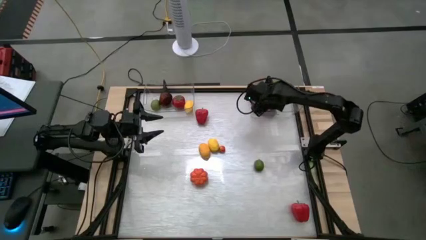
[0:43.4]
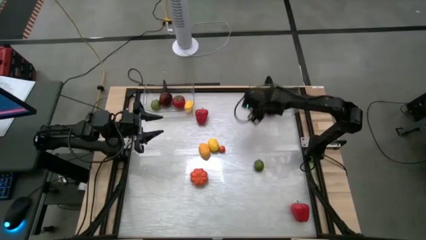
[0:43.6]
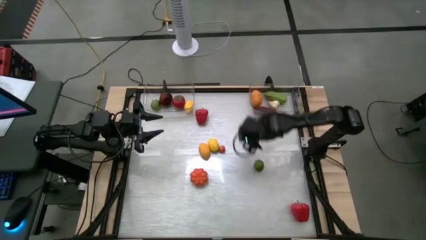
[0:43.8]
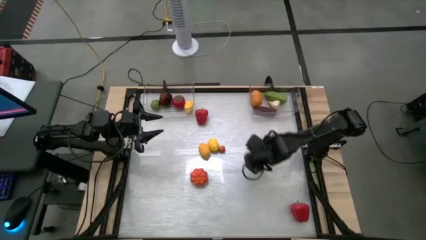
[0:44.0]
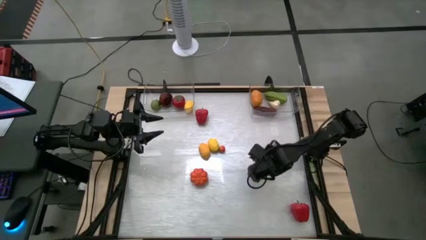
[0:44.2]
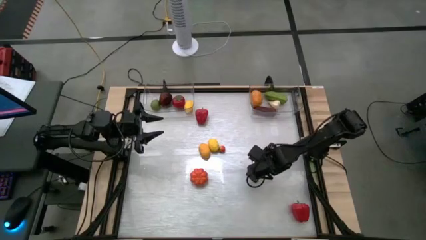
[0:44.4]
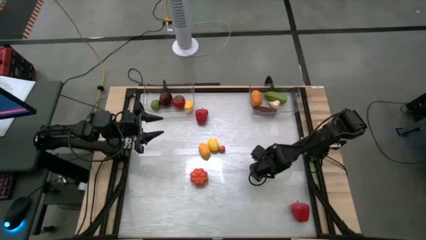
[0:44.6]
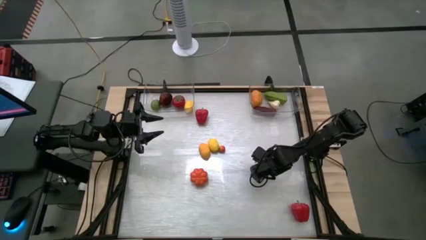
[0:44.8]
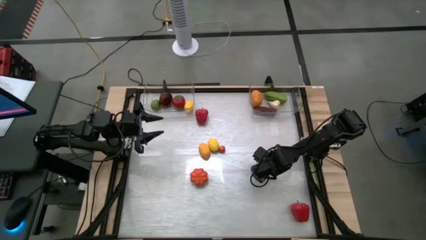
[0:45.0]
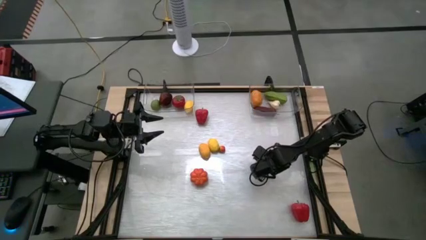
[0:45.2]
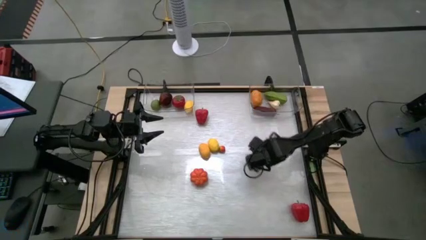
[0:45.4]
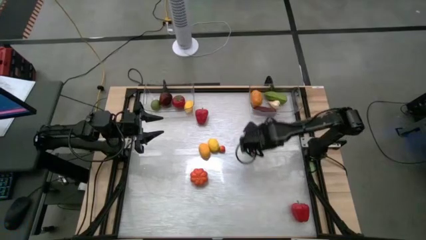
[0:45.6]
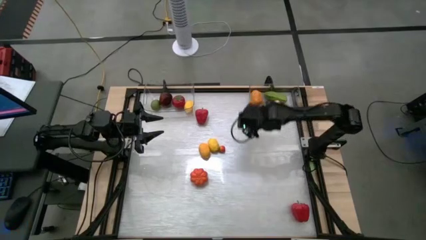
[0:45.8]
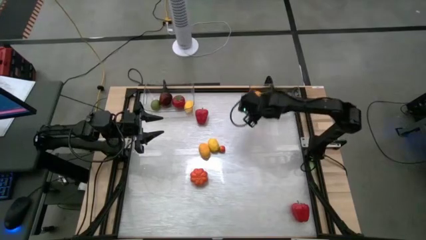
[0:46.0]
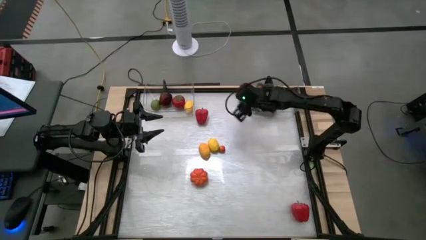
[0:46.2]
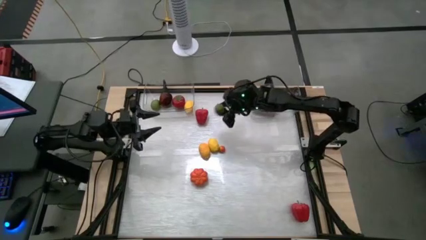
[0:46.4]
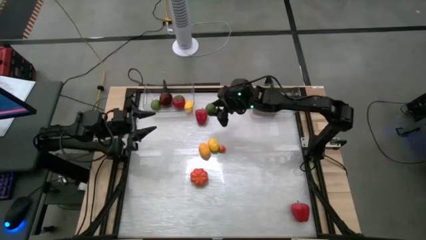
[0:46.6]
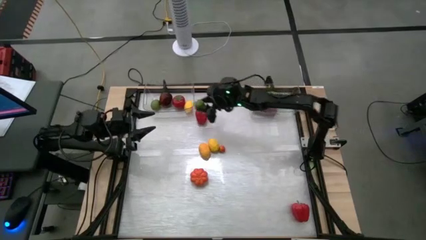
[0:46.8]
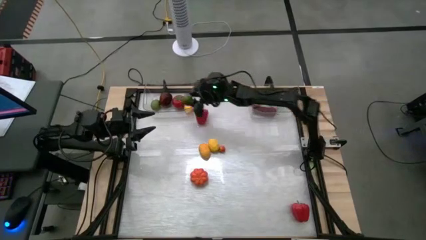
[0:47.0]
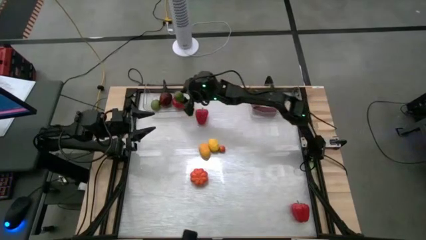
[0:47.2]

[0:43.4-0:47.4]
Task: Sort produce into baskets
Put the green lime into the left transparent bin

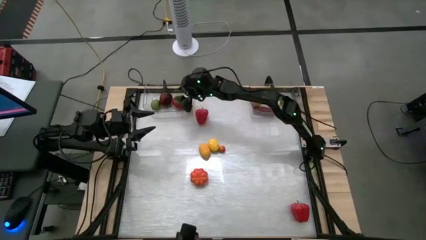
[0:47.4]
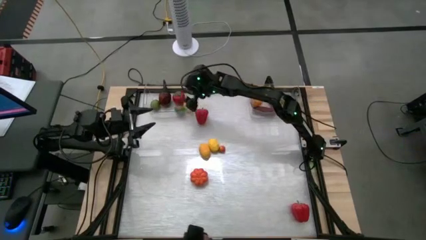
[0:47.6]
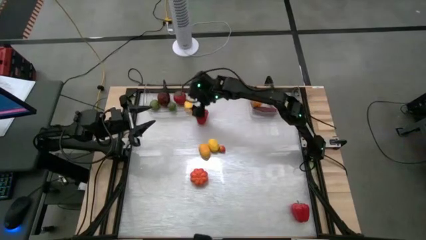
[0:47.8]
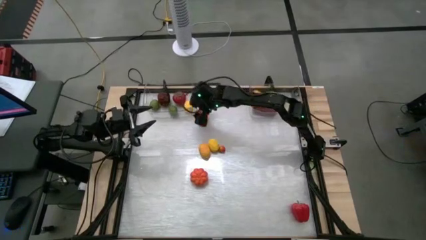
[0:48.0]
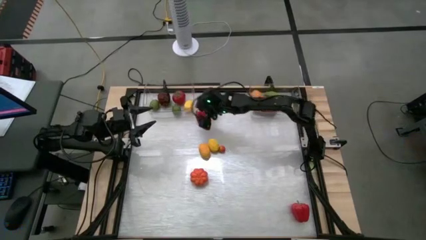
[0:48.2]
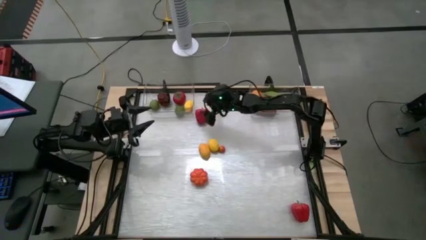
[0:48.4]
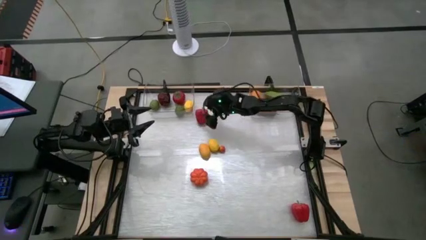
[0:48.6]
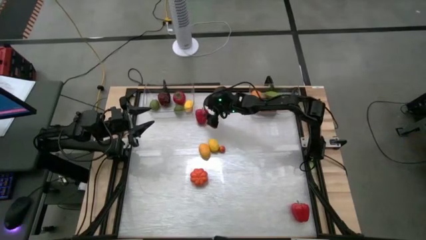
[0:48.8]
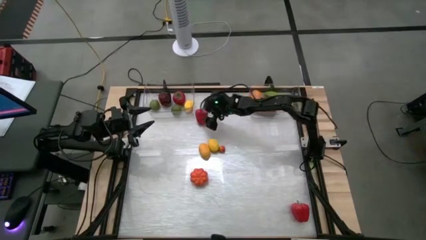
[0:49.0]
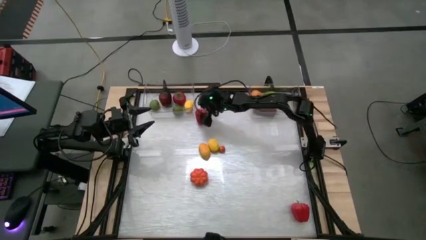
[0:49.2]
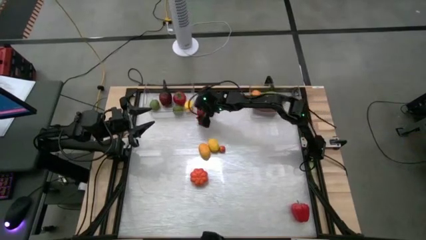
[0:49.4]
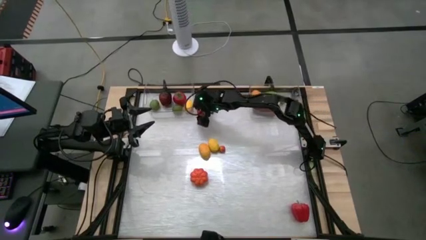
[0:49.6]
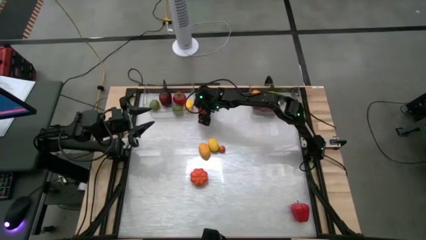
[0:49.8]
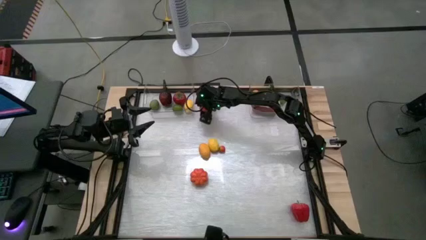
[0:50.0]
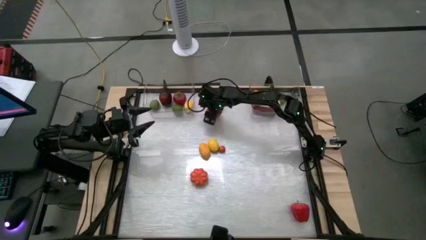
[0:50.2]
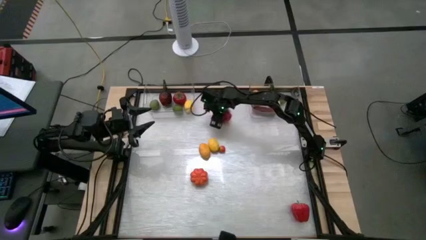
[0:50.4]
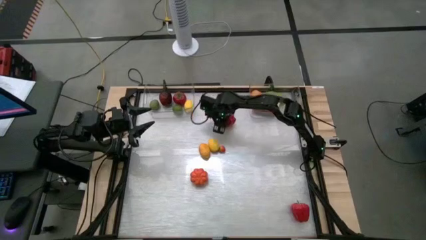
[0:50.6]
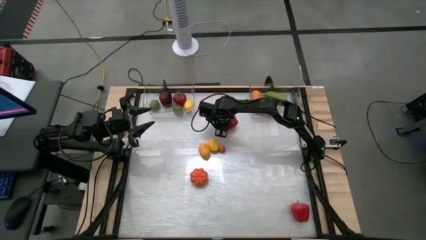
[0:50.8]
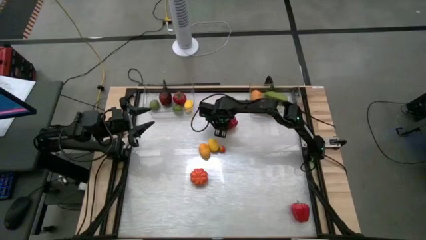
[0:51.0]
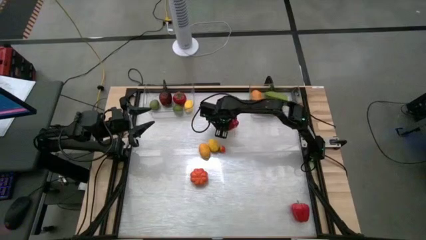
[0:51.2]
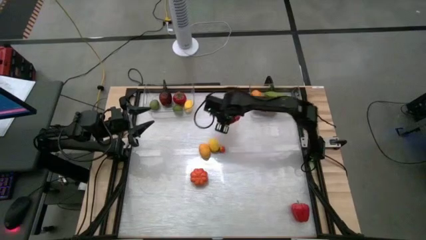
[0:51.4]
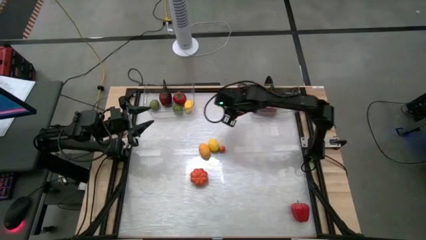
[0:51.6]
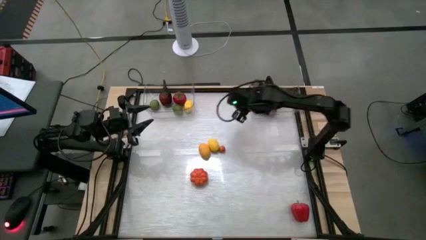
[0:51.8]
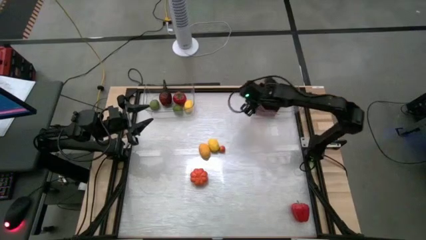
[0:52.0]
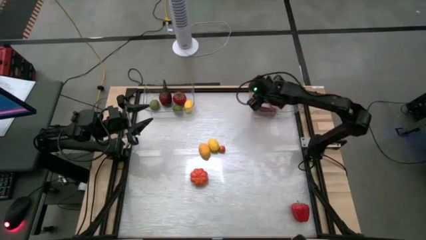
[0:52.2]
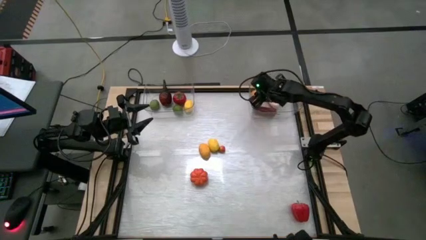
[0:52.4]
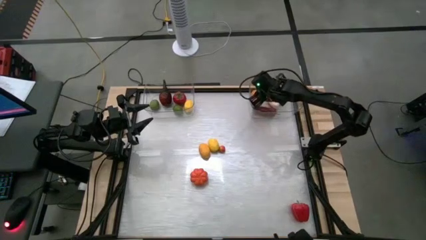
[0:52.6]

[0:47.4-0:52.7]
Put the top red bell pepper into the right transparent bin

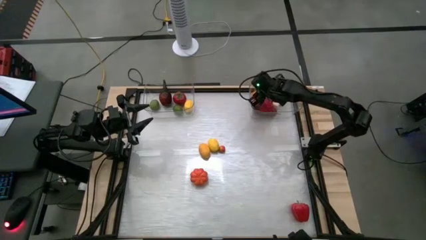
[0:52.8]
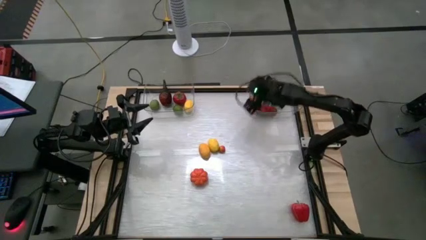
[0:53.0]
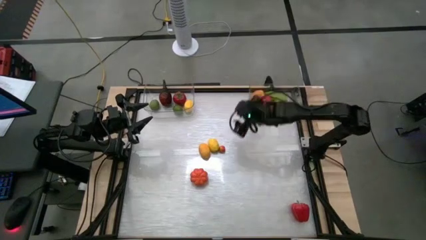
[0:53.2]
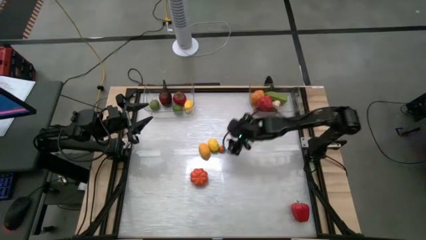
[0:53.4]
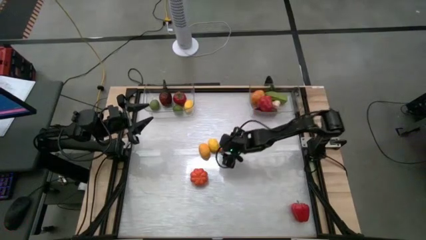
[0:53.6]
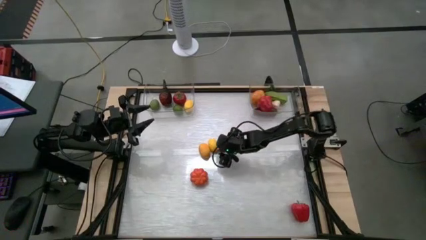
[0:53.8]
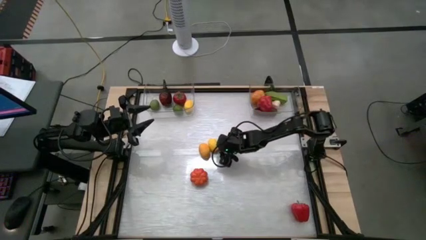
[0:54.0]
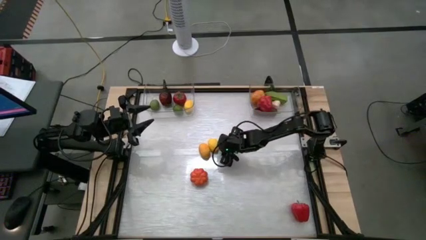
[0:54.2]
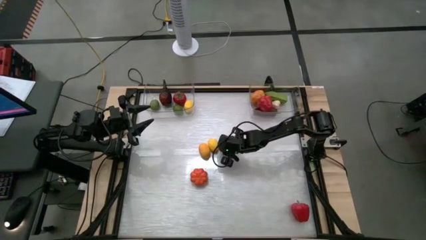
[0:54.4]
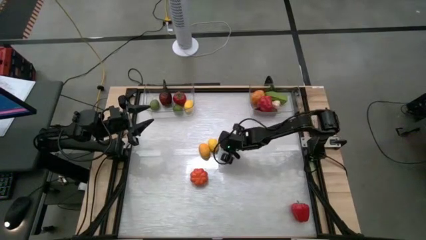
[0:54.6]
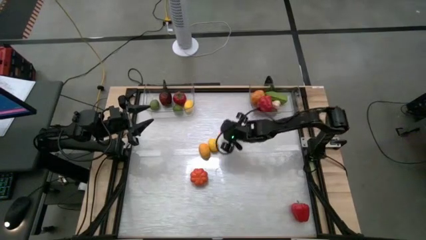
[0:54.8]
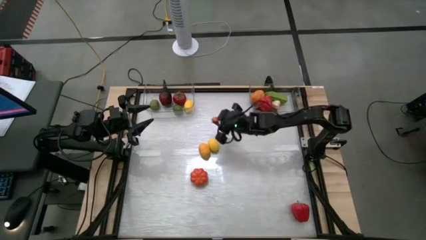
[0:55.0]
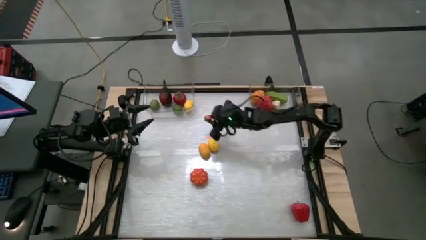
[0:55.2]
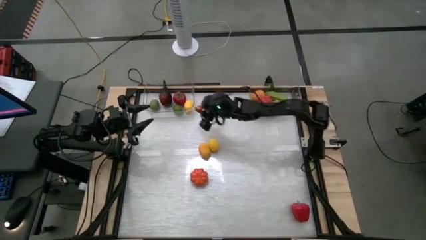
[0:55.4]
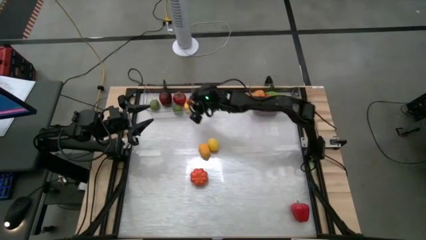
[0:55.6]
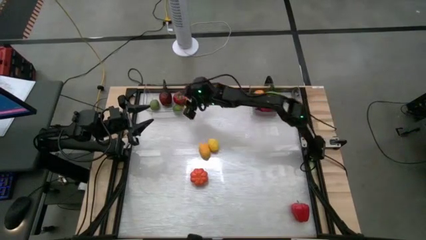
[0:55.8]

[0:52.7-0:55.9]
Put the red tomato into the left transparent bin

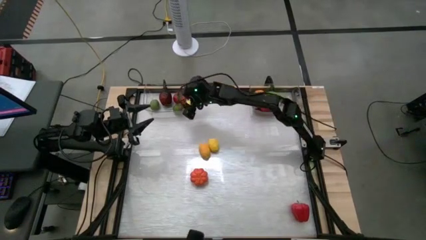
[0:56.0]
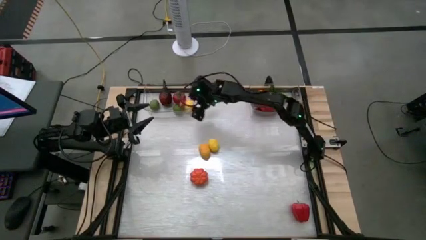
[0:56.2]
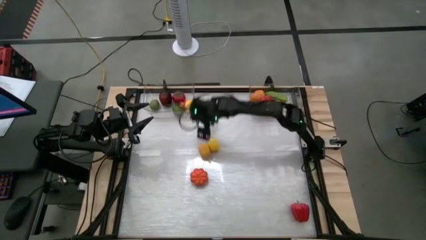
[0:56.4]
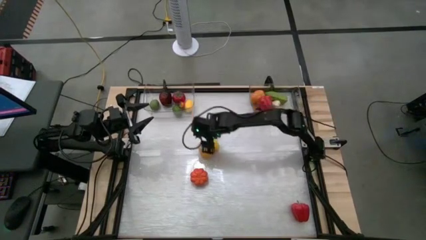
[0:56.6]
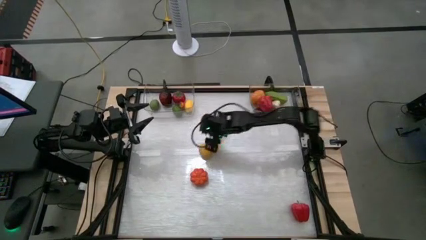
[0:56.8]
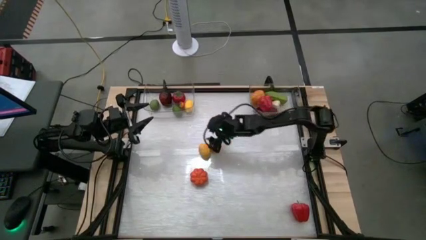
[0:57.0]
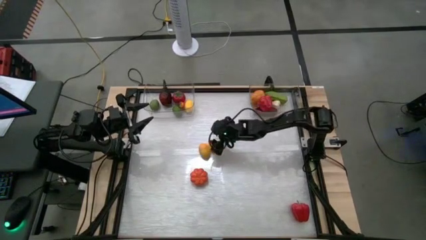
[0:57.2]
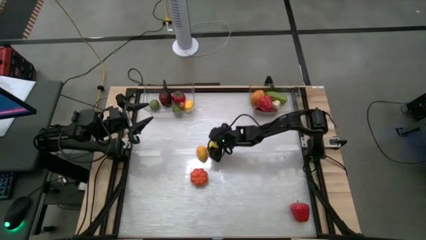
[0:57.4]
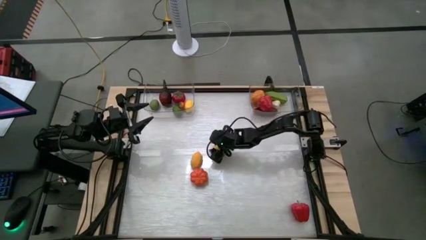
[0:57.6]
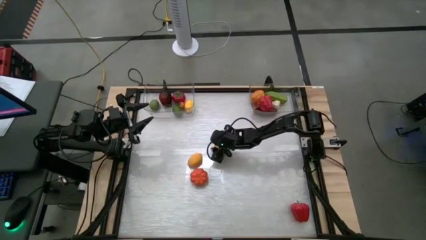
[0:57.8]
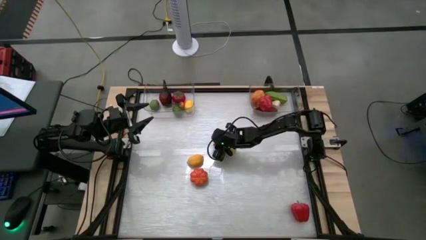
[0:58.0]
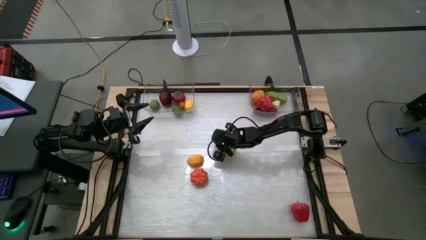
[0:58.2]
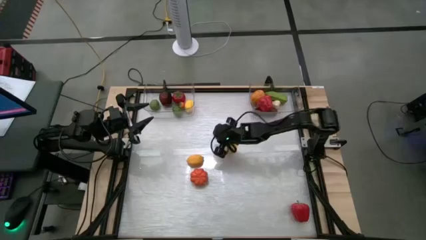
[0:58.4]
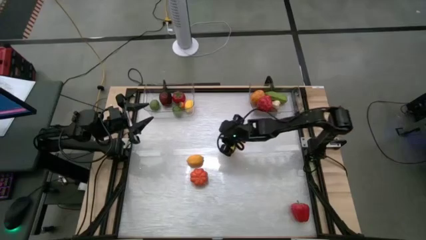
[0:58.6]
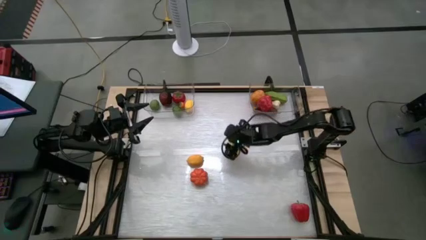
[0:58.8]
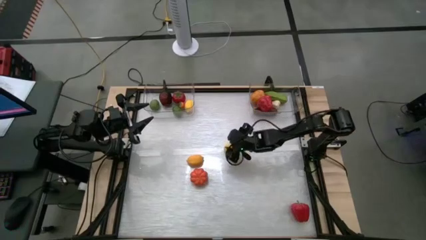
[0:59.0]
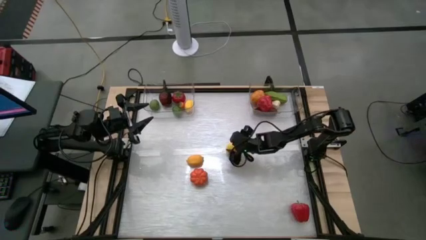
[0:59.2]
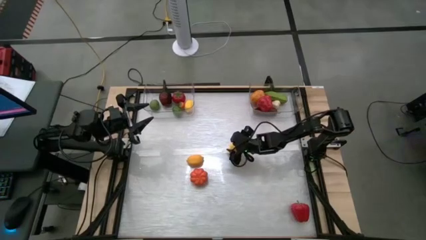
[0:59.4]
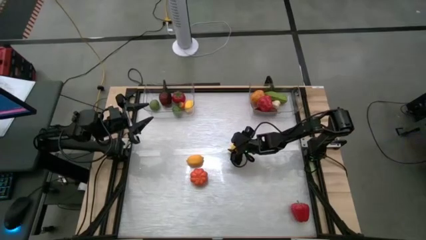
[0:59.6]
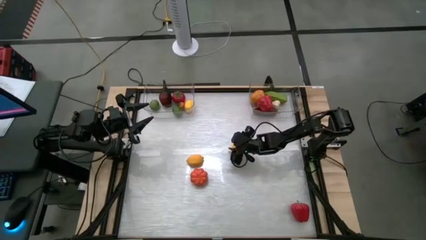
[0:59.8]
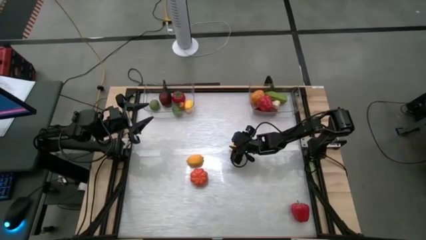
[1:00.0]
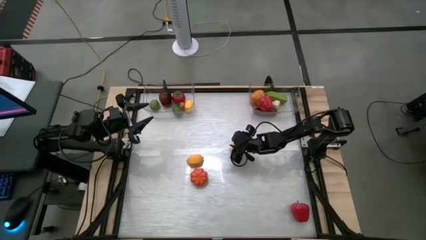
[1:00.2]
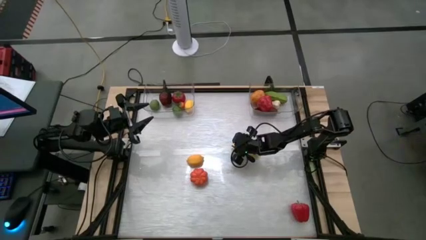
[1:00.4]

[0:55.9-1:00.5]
Put the right yellow lemon into the left transparent bin
